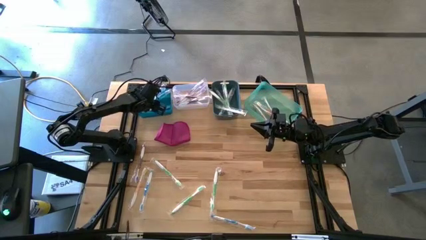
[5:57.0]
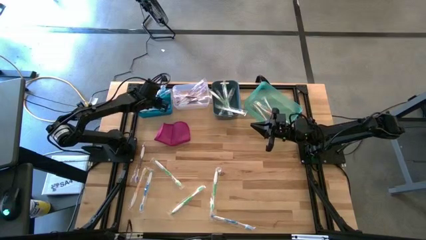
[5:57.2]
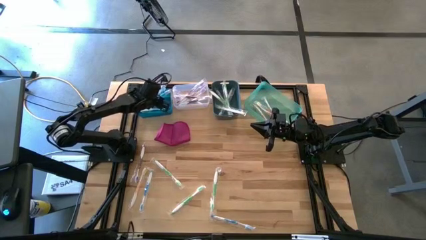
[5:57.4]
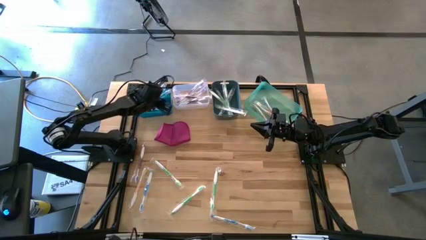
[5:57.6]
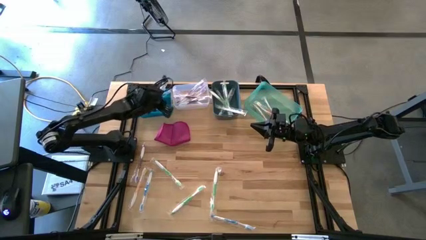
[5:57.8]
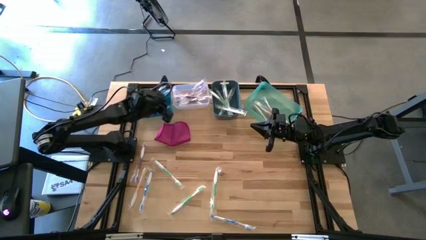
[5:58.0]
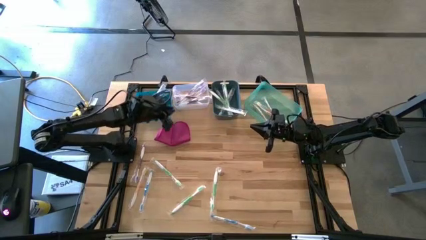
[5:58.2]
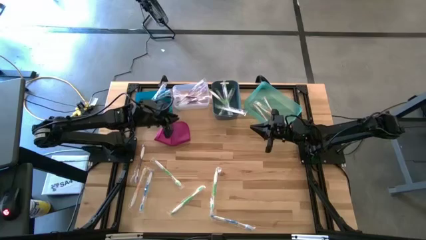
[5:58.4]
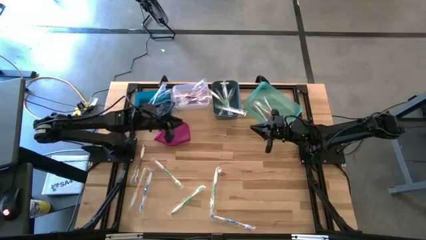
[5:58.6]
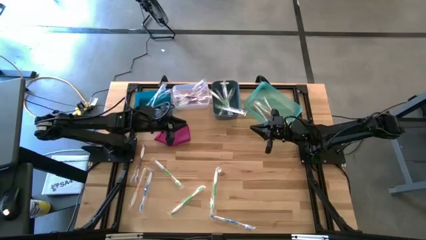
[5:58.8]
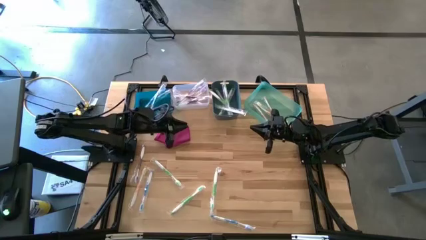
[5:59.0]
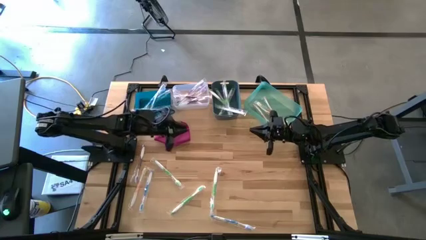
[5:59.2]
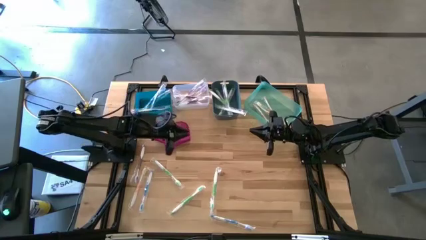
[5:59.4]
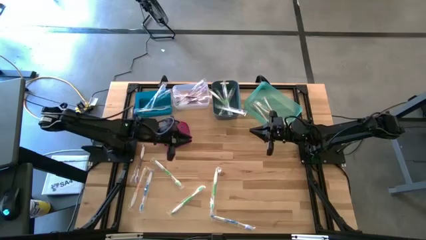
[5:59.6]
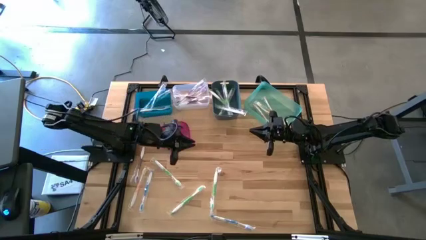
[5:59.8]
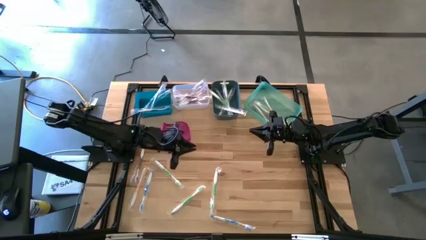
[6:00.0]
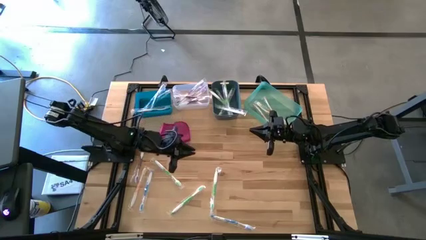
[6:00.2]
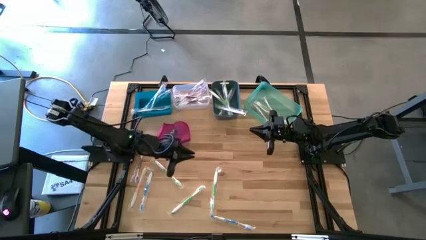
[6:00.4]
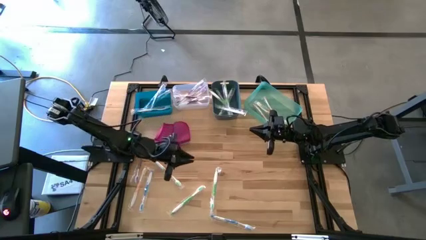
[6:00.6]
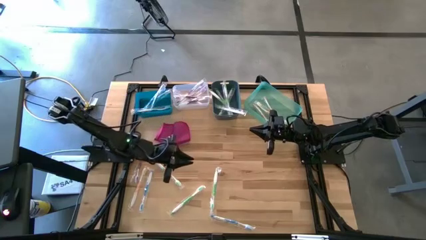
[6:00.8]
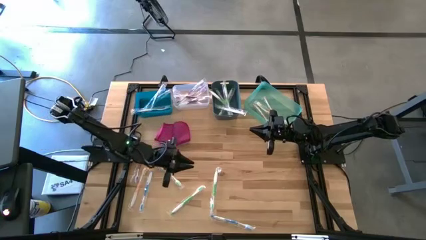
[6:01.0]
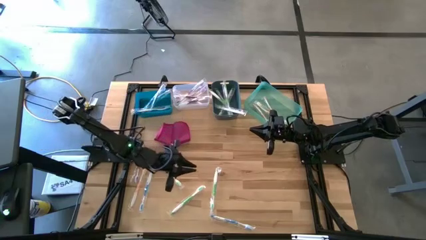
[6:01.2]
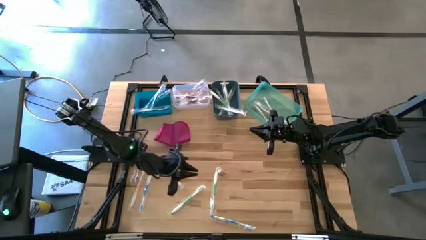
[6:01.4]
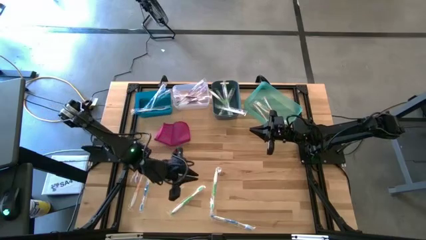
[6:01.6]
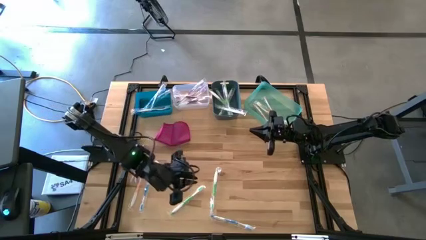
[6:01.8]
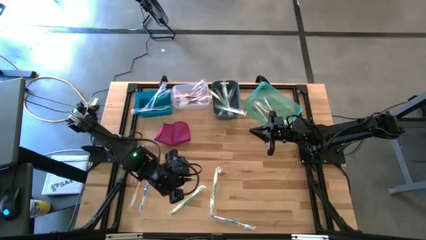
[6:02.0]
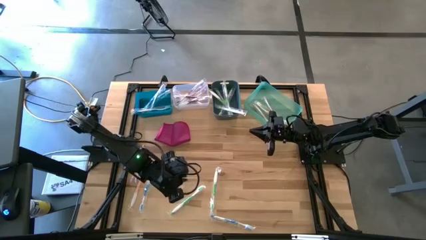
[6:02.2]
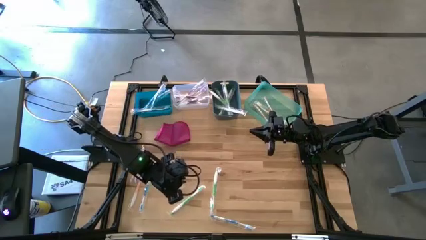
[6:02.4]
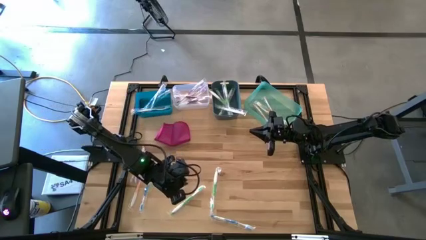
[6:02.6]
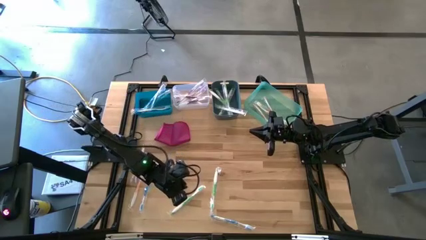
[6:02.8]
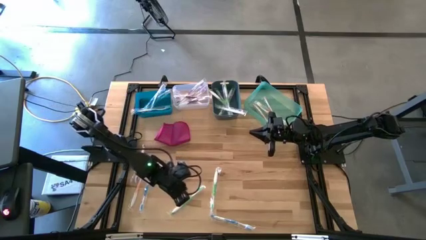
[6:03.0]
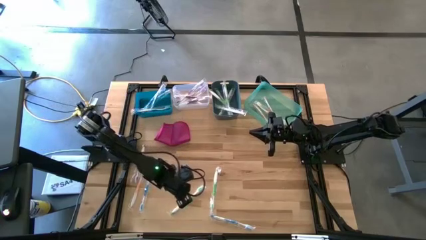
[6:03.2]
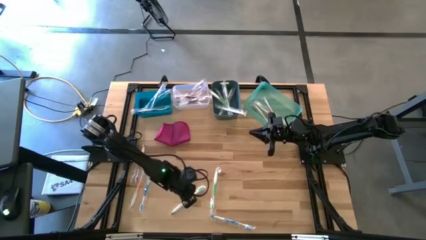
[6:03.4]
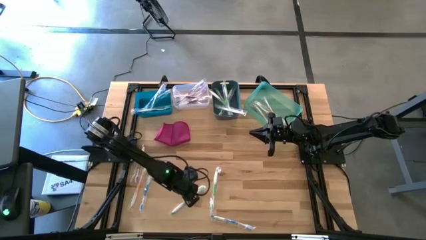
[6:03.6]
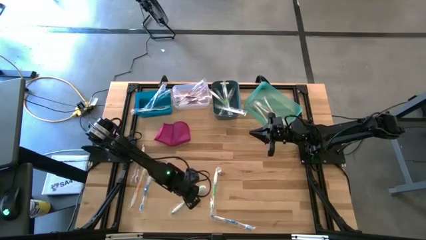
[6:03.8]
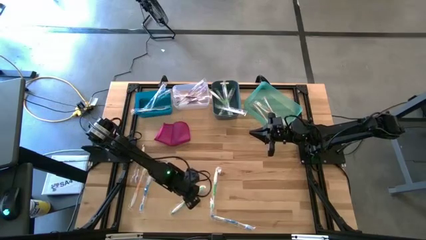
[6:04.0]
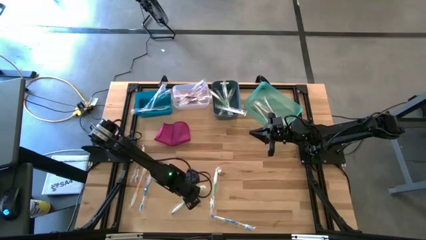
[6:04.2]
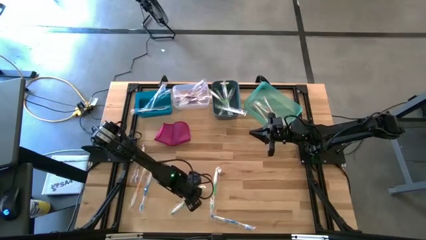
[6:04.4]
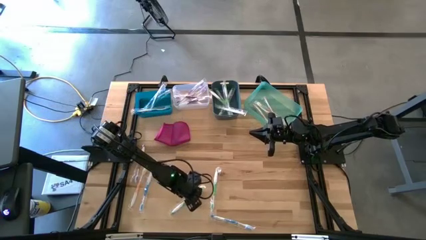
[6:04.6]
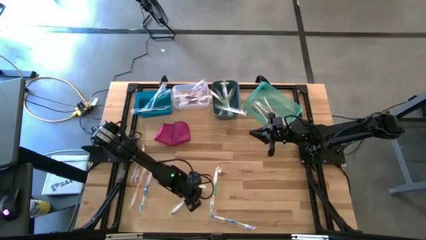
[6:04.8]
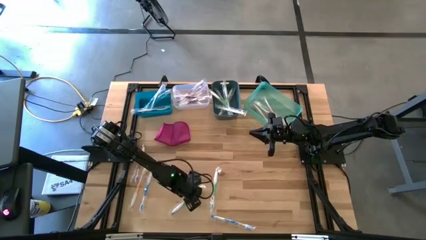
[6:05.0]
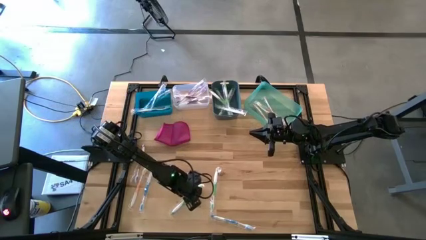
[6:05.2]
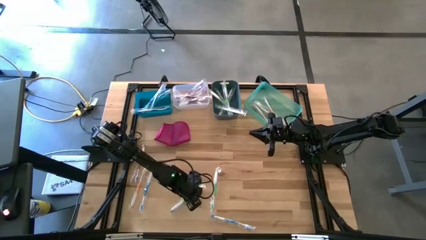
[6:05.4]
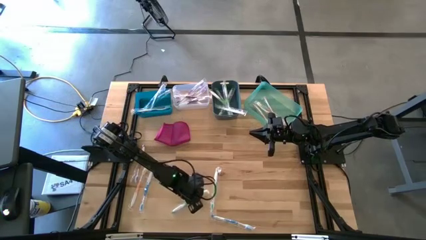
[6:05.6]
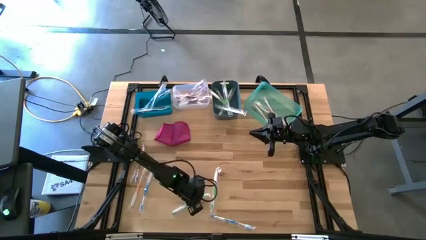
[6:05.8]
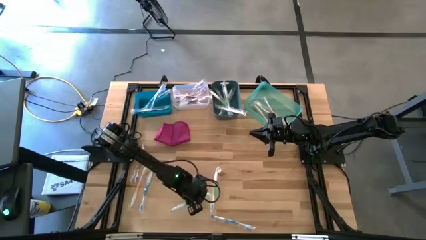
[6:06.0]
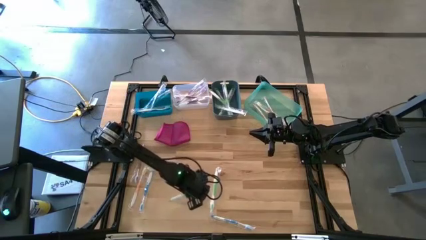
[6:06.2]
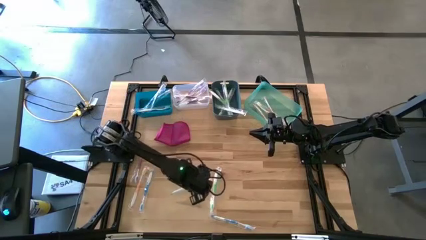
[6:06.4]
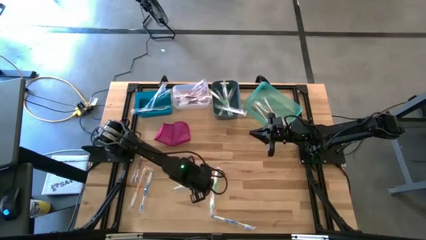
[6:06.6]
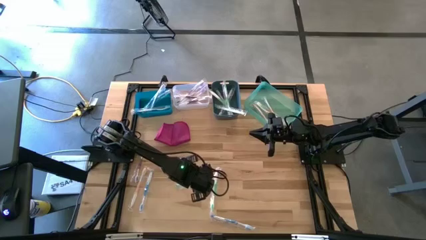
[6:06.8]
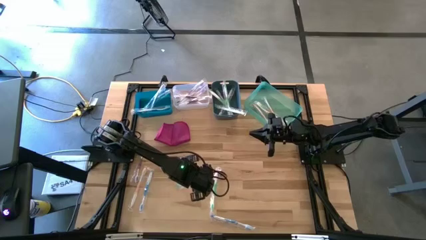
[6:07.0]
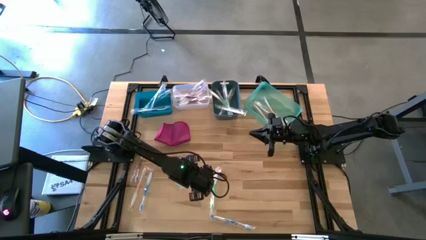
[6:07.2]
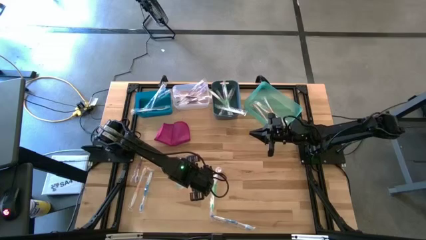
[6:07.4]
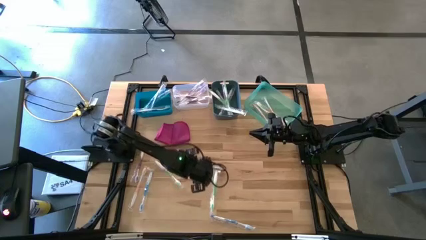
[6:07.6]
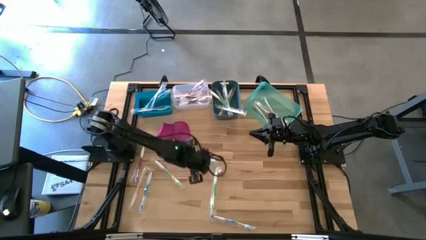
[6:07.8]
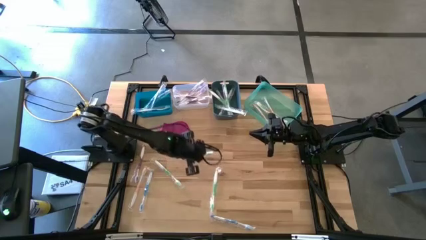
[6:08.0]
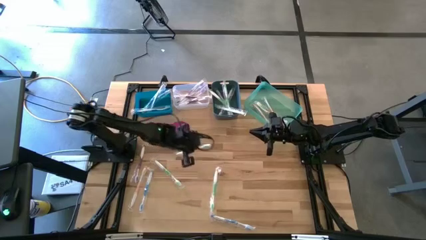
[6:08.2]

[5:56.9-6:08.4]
Task: Pick & Place Toothbrushes
Put the green toothbrush into the dark blue bin

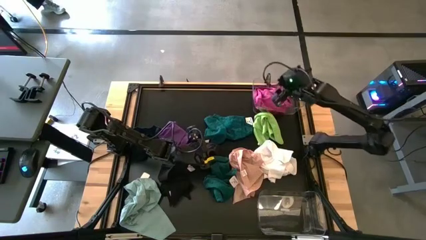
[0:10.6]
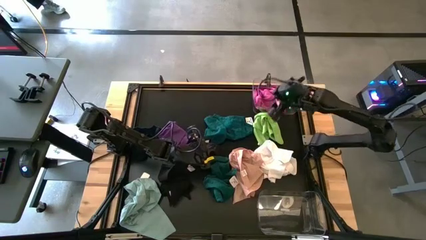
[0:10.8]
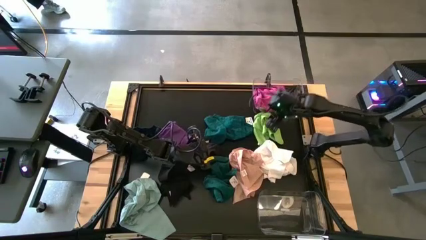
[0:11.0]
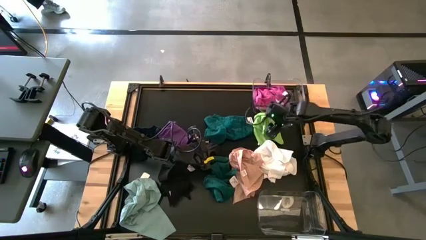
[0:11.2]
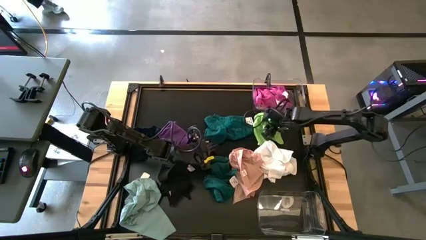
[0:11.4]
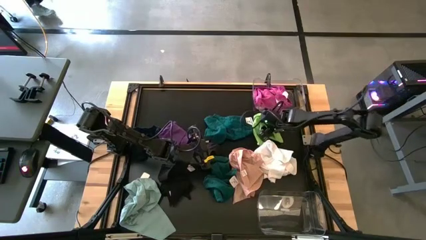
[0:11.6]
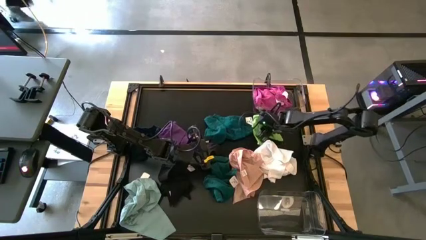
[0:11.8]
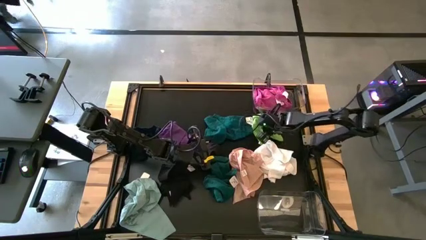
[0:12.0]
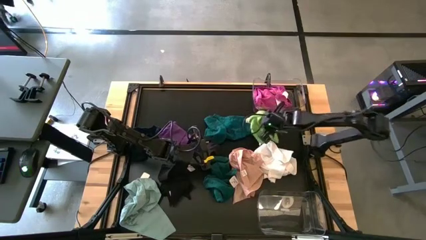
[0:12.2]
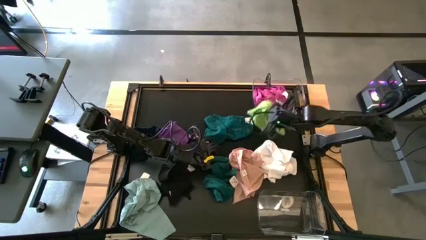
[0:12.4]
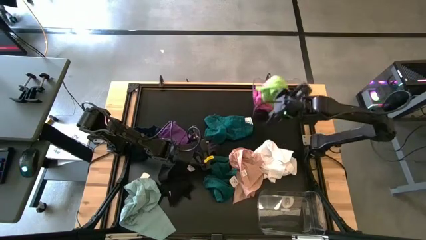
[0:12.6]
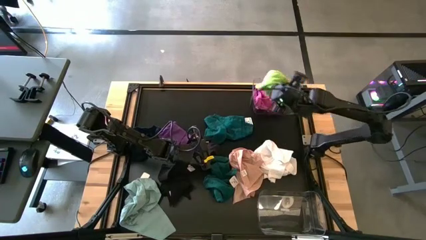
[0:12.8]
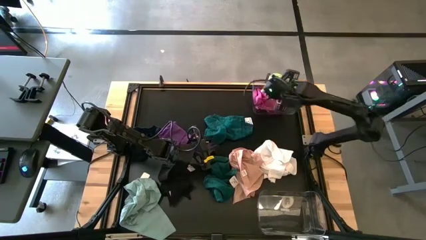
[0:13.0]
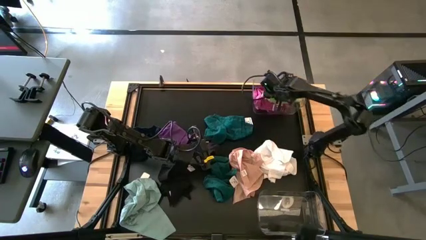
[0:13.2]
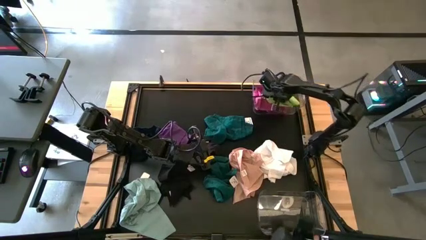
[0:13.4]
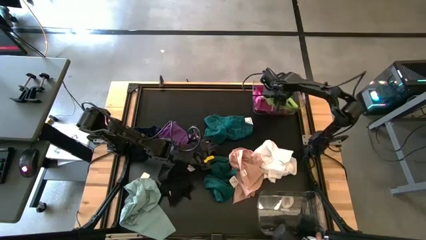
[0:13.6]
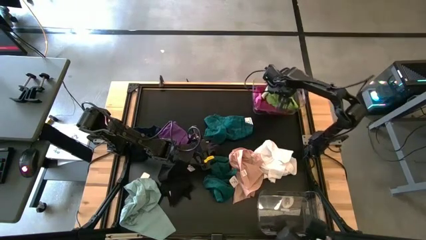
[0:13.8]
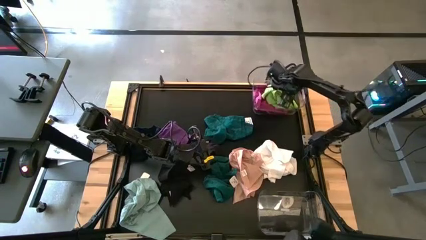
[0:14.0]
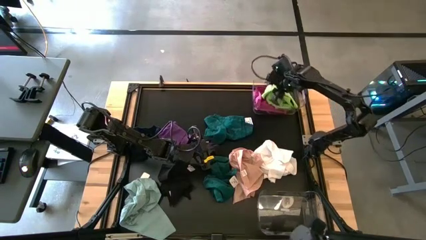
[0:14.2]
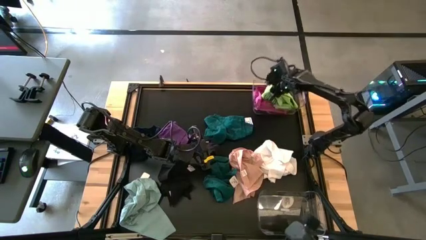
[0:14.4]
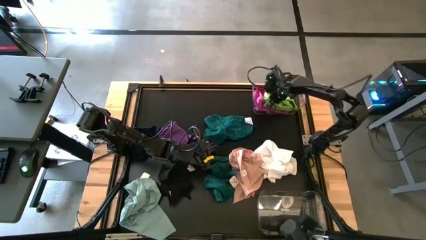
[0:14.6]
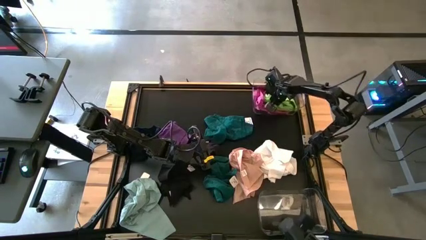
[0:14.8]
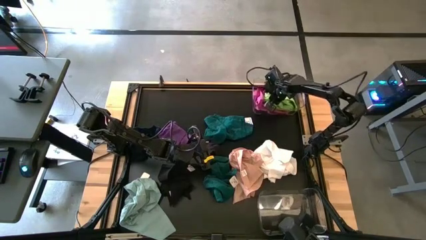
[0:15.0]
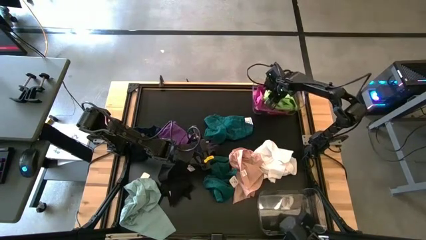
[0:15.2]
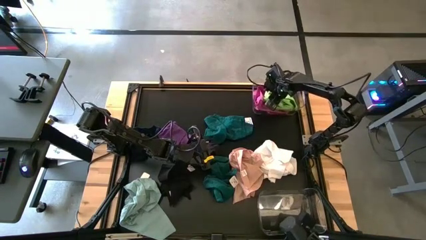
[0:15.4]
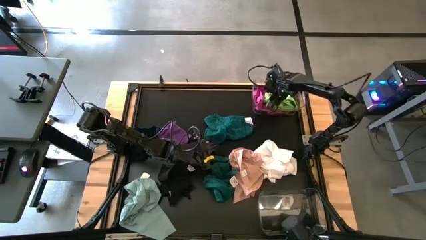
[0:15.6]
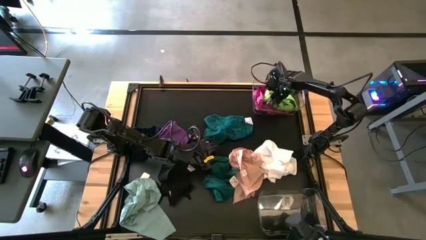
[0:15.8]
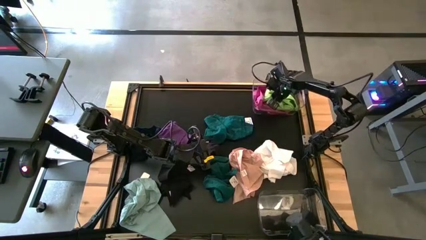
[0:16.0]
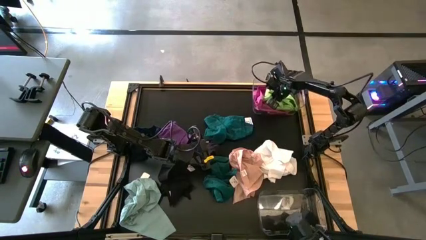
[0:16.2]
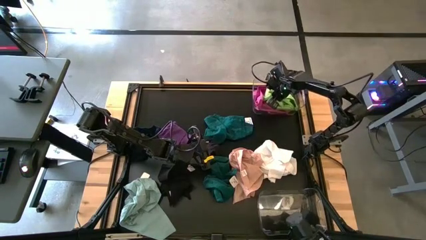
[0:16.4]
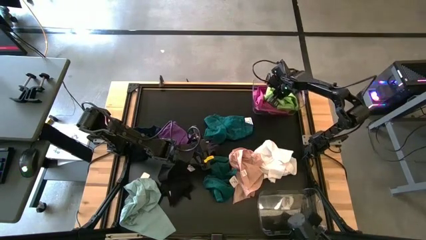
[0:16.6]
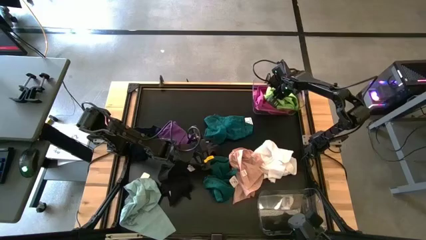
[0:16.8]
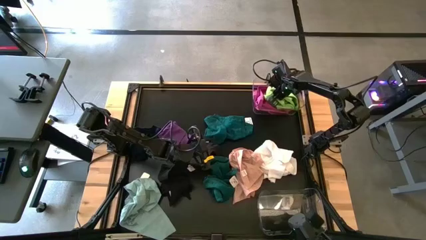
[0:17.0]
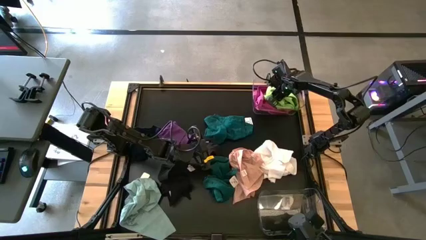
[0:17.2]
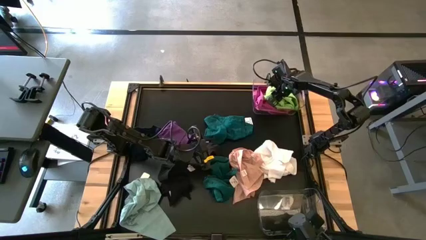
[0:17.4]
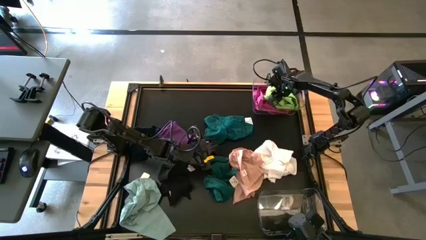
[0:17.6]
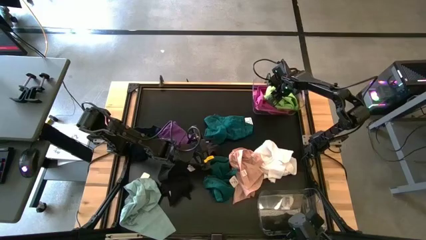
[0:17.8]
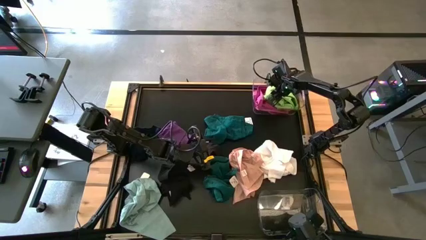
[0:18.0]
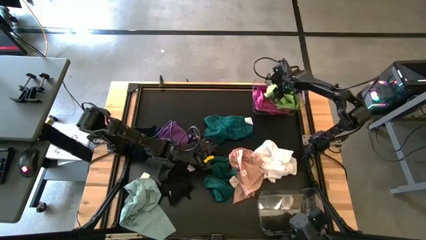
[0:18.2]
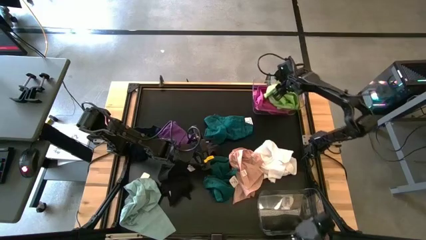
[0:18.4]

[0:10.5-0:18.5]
Task: Sort towels by color in basket
Put the light green towel into the top transparent bin
